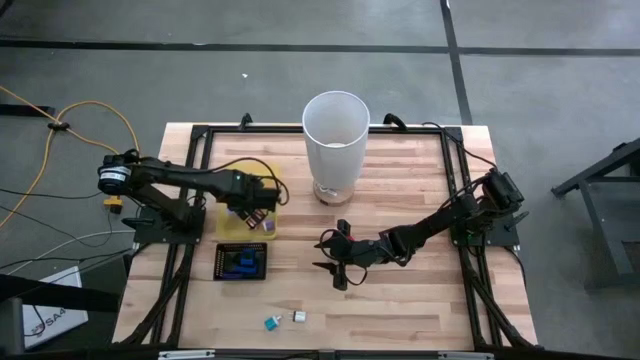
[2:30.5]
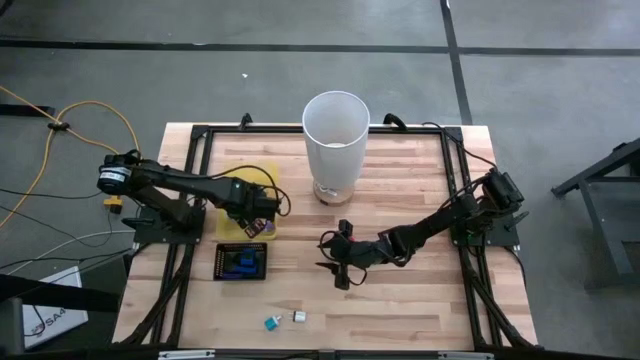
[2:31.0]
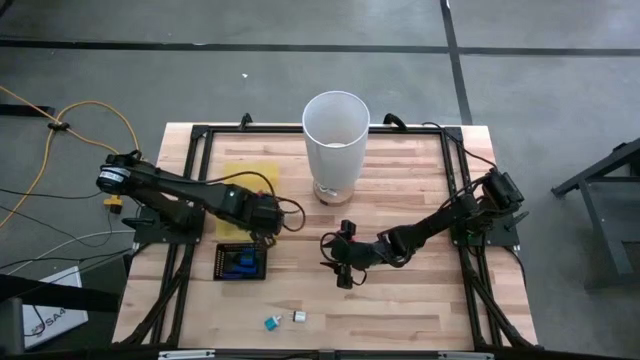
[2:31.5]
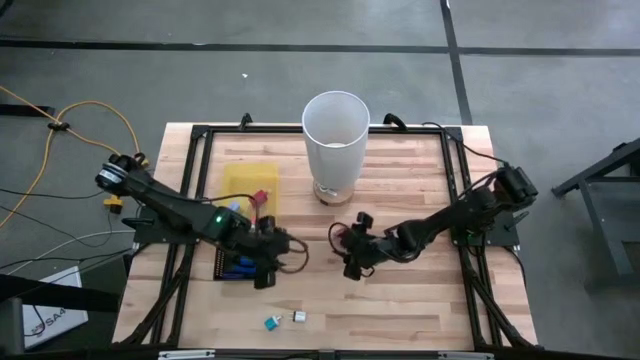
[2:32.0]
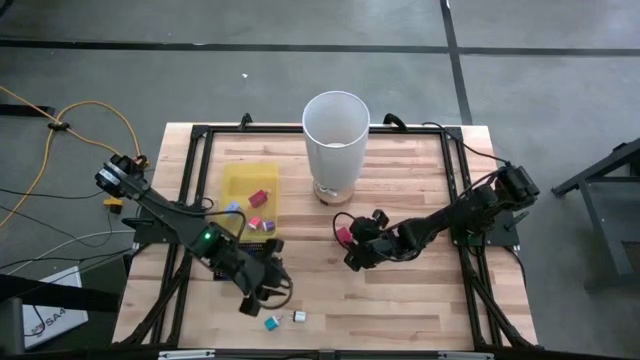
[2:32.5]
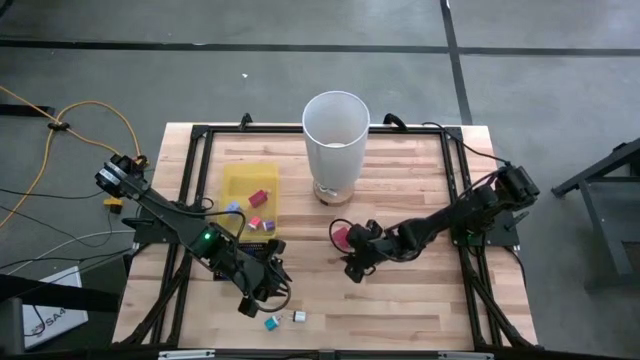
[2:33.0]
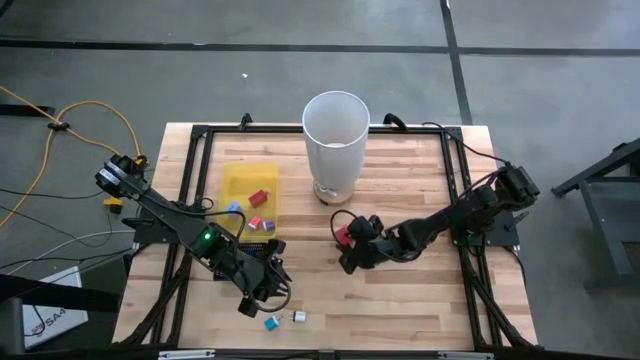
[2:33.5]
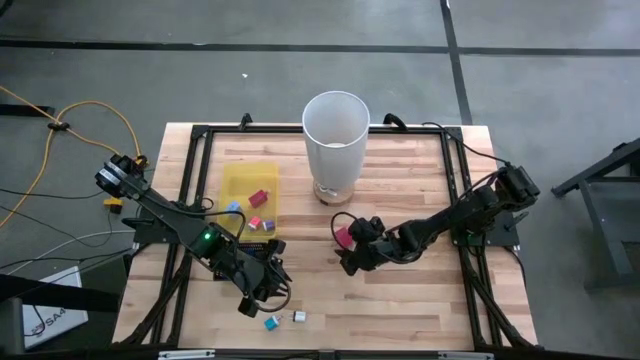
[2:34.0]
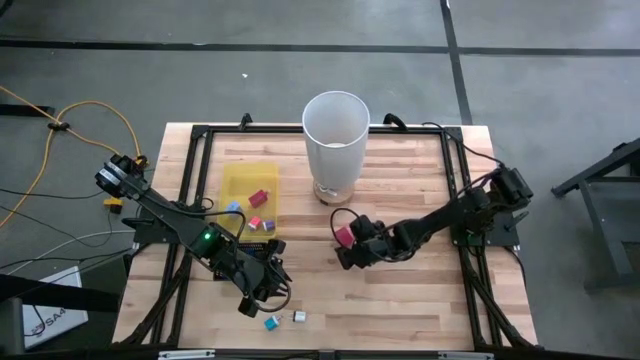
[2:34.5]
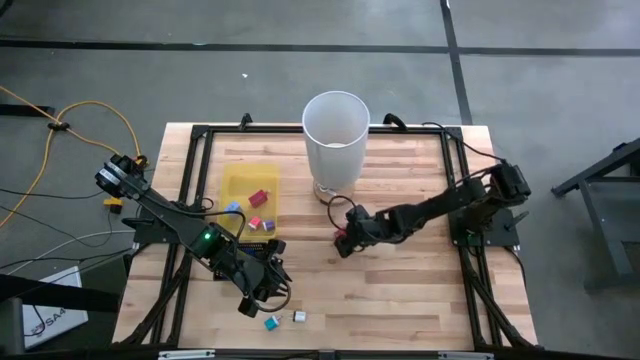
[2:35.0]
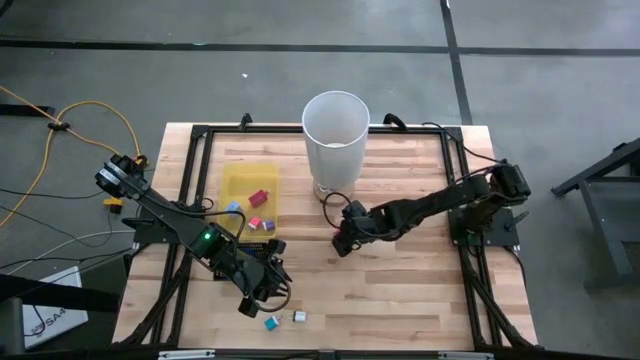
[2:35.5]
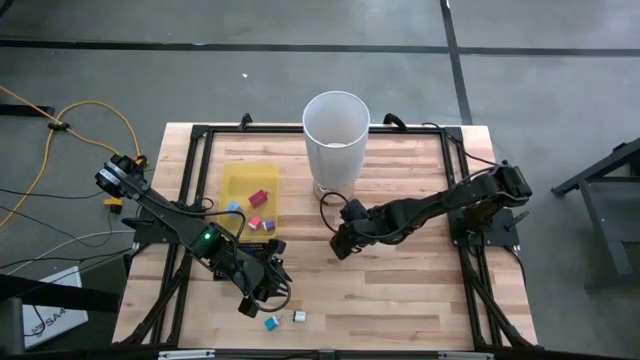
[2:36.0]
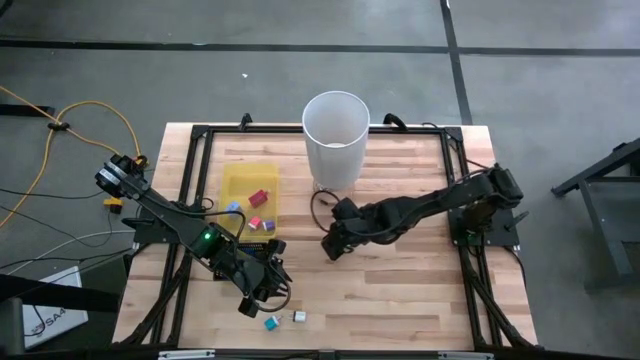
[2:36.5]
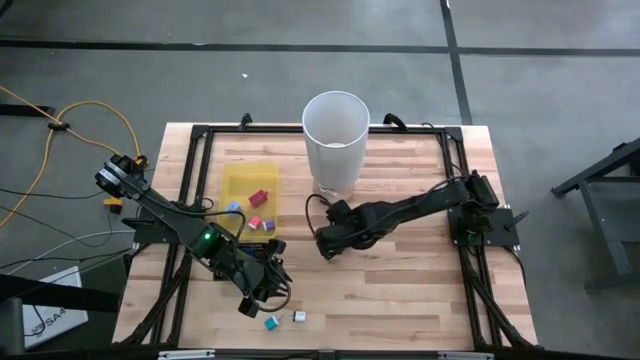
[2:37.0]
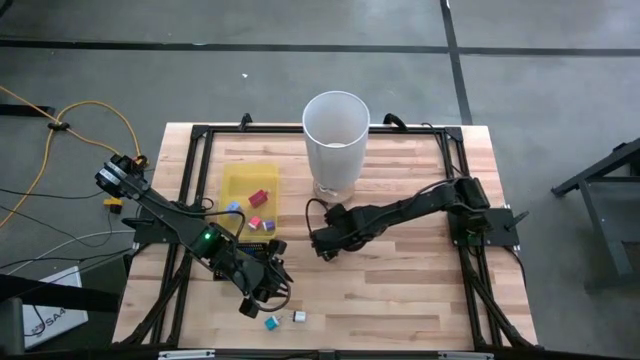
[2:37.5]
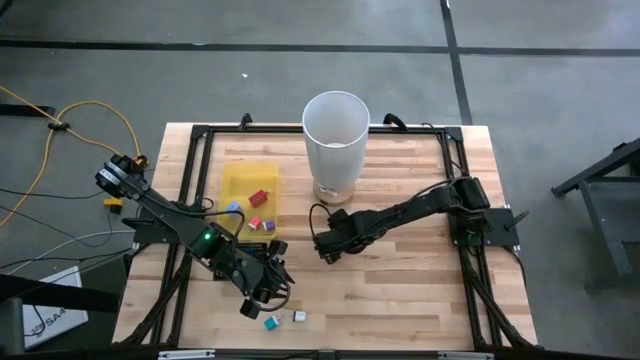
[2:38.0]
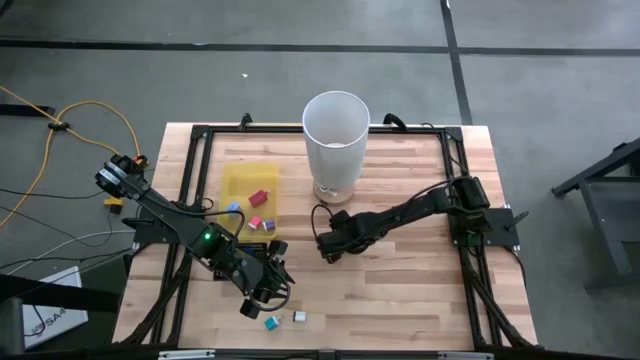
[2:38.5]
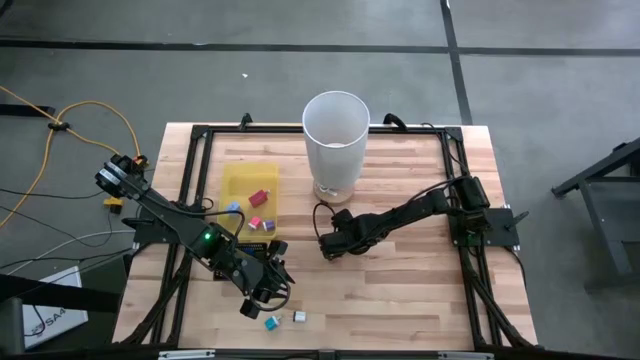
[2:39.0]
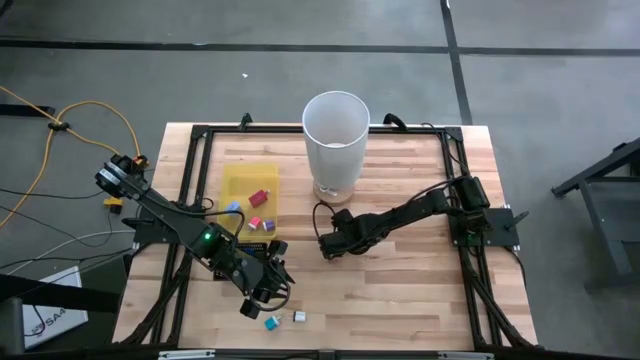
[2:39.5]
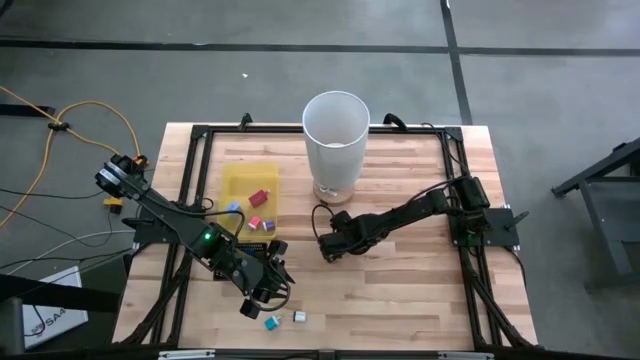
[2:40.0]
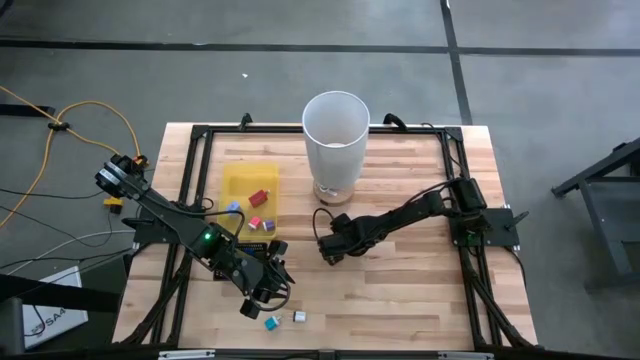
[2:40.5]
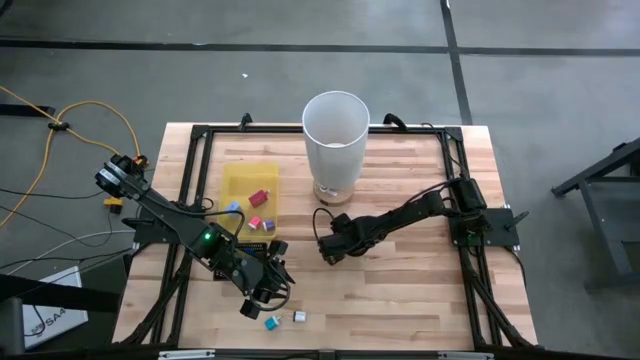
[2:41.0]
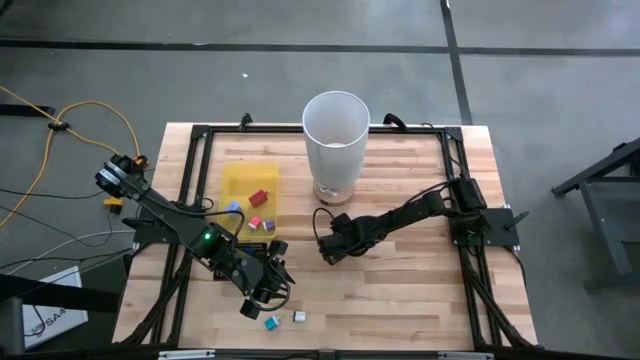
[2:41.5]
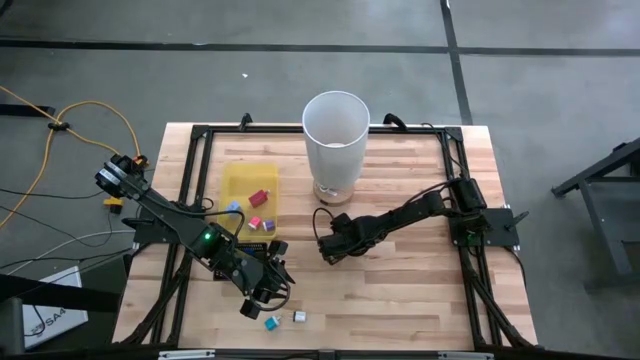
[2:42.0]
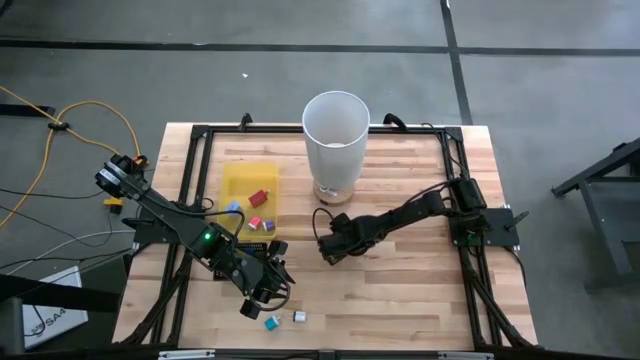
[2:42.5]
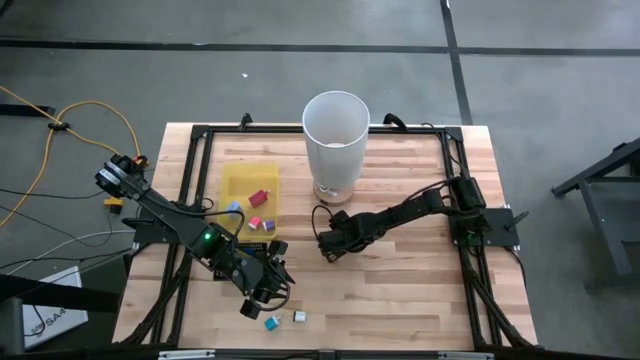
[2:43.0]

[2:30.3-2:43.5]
Task: Pick & Place Office items
Put the red charger adapter into the yellow bin

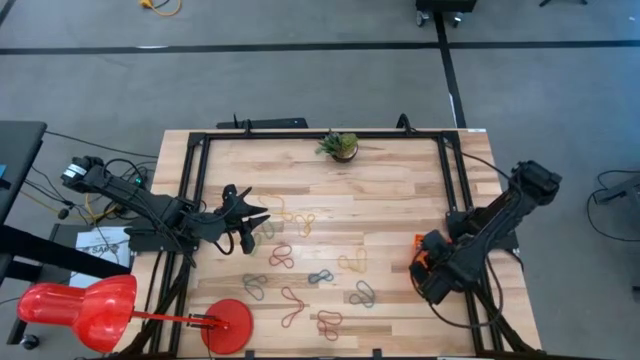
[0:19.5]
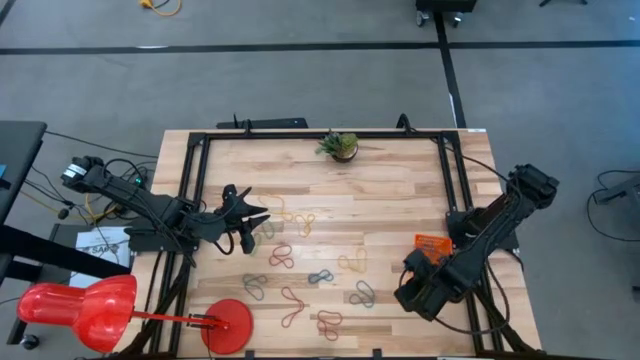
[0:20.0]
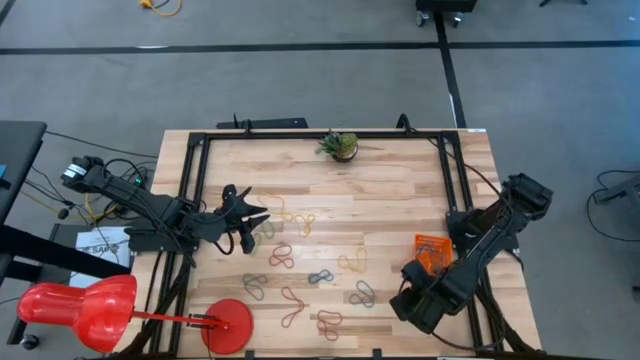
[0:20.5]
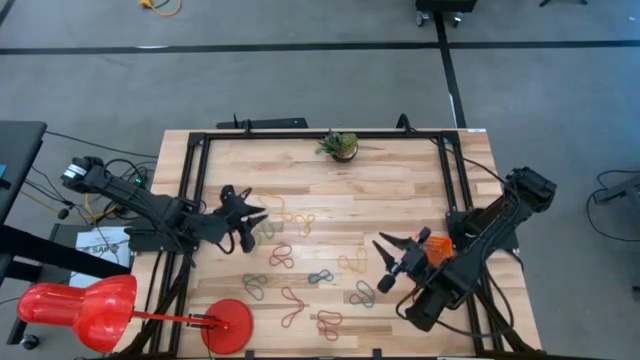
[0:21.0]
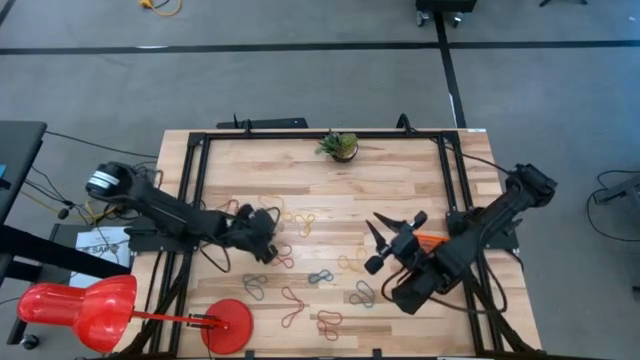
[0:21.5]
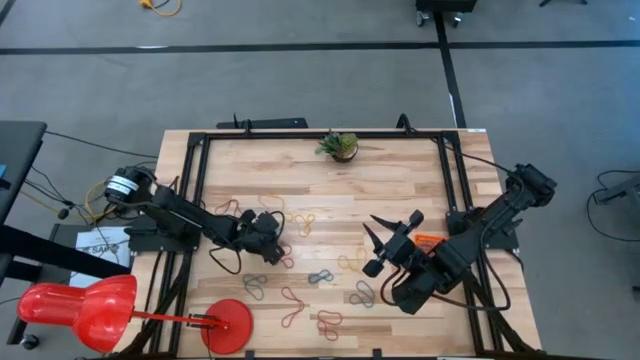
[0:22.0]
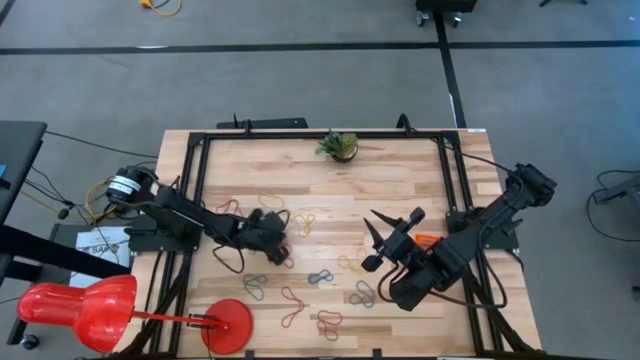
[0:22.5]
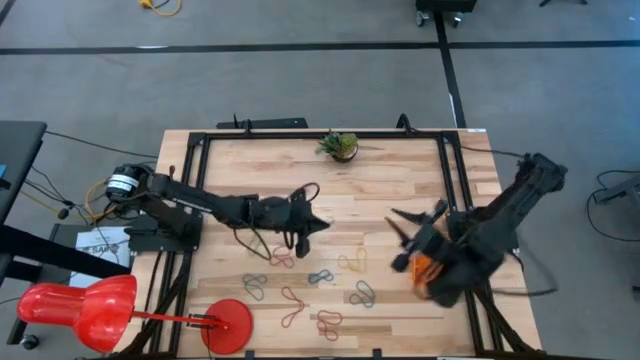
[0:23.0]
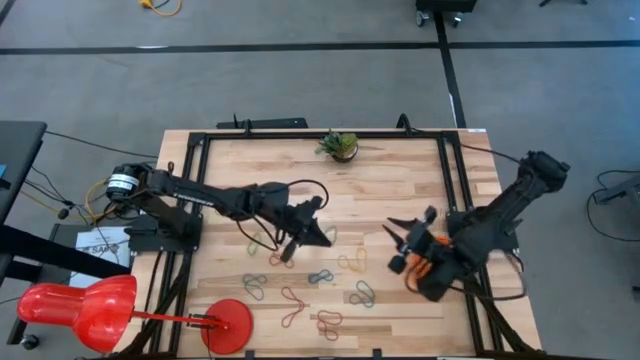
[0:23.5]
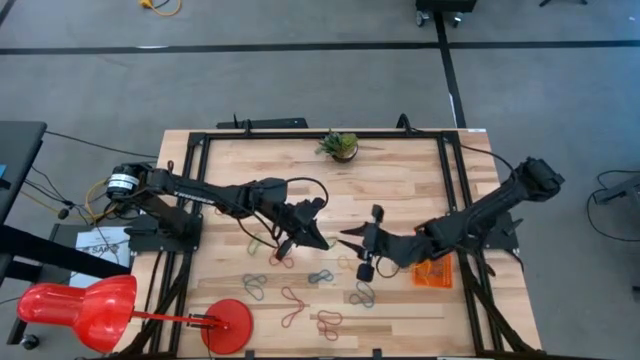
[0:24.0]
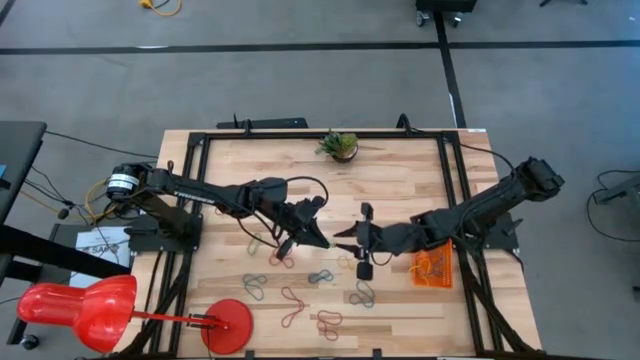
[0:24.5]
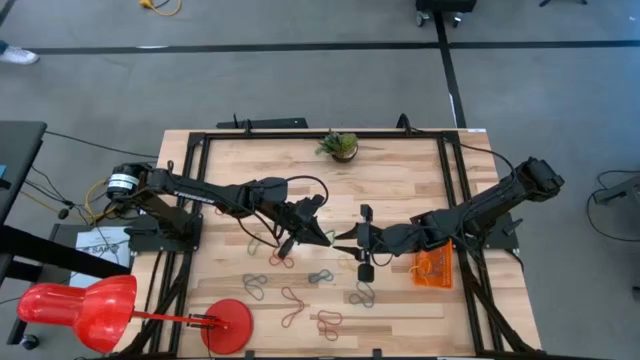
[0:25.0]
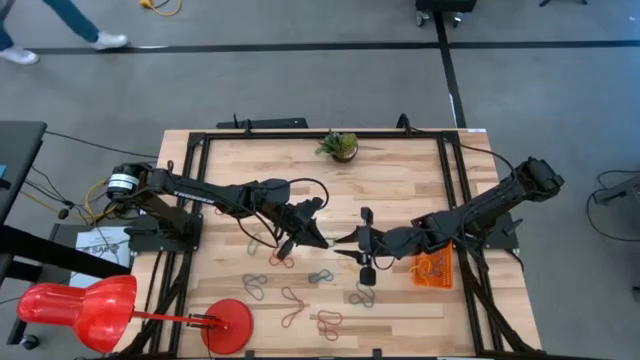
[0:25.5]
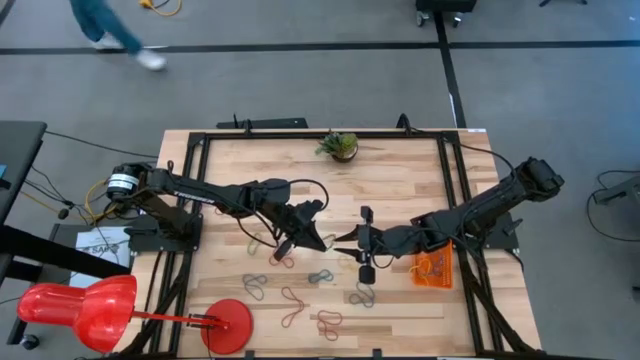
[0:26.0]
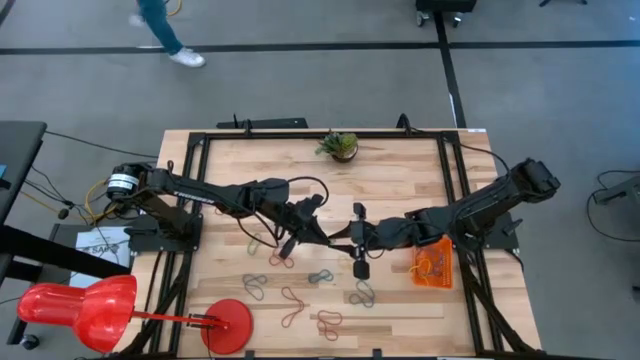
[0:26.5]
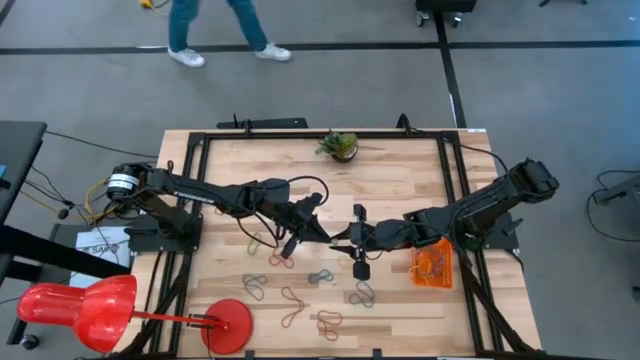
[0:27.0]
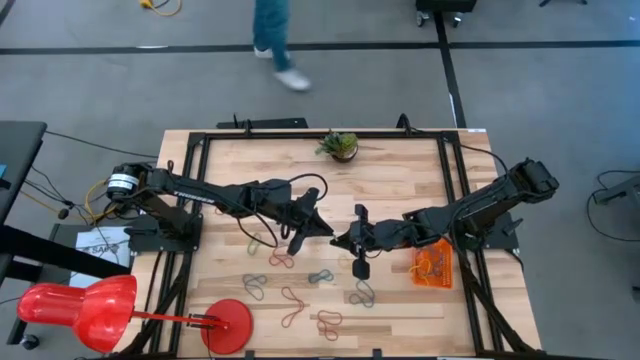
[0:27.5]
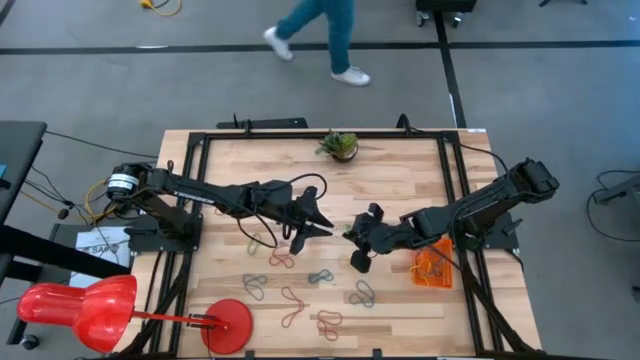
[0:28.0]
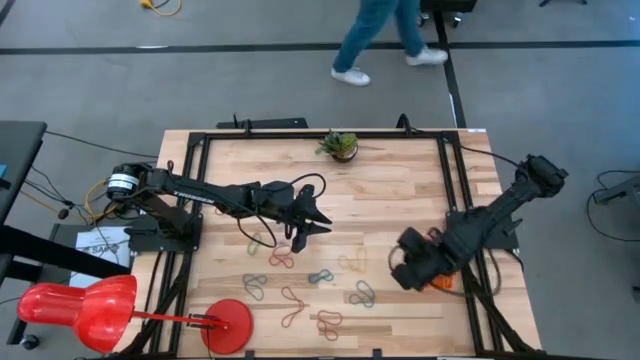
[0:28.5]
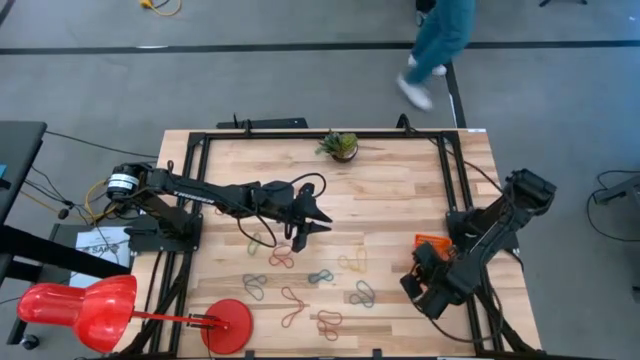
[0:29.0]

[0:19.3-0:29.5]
Task: Pick and place rubber bands into bin
Put the green rubber band into the orange basket
